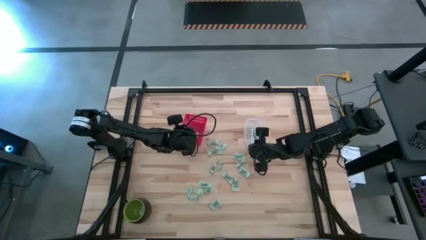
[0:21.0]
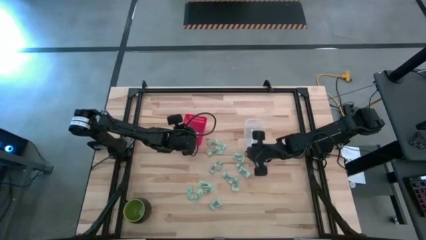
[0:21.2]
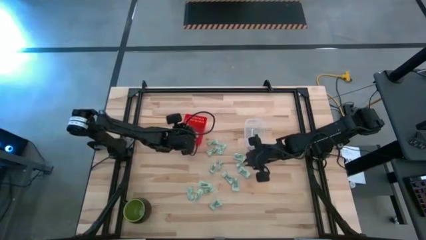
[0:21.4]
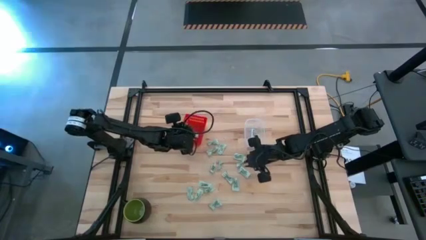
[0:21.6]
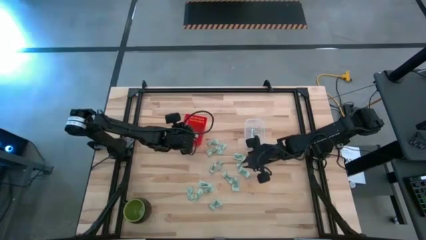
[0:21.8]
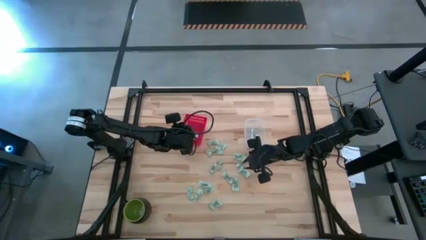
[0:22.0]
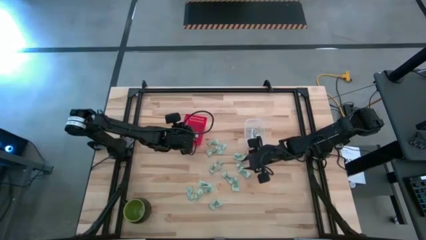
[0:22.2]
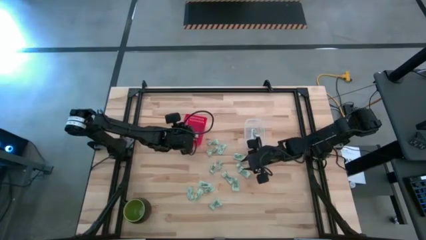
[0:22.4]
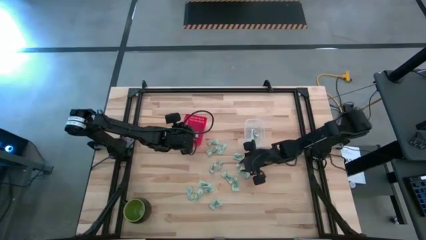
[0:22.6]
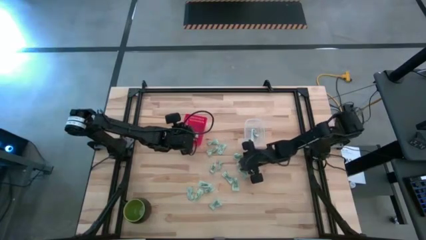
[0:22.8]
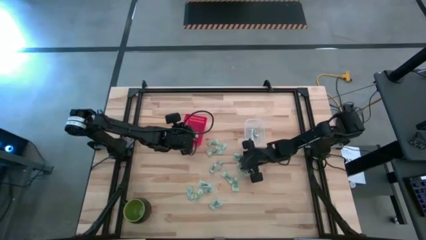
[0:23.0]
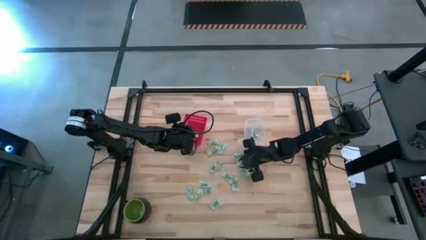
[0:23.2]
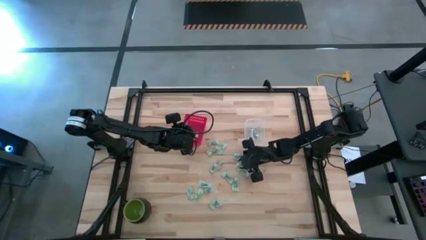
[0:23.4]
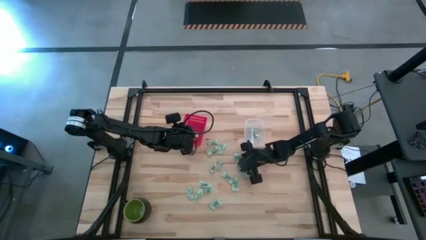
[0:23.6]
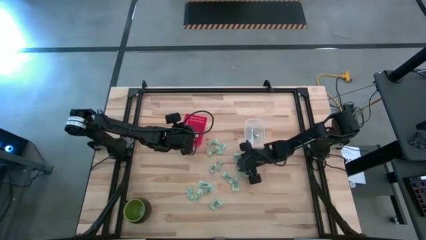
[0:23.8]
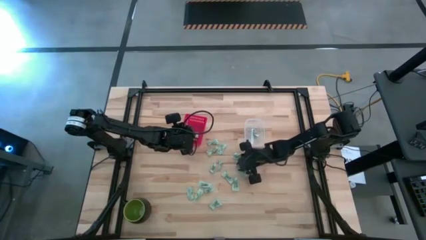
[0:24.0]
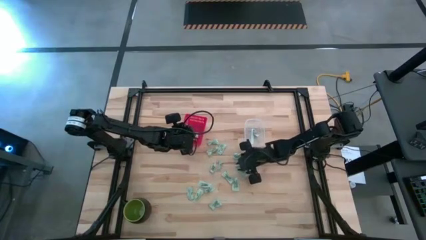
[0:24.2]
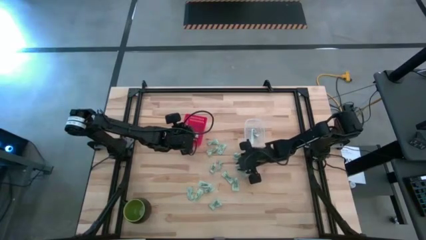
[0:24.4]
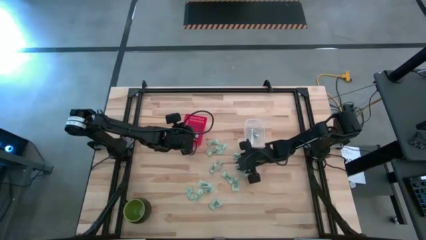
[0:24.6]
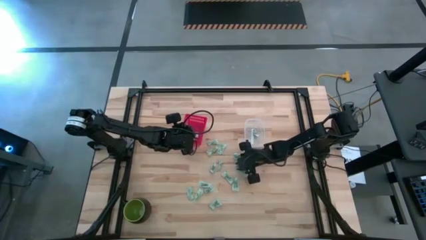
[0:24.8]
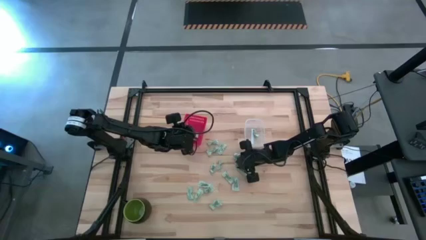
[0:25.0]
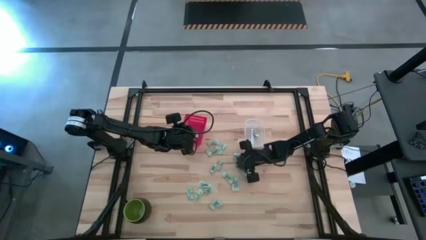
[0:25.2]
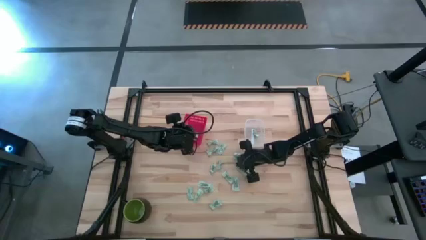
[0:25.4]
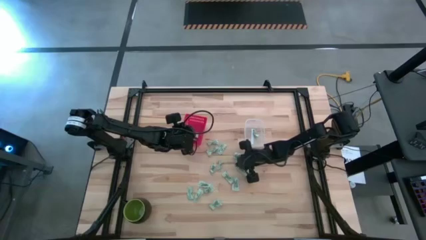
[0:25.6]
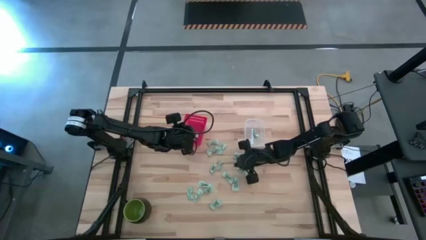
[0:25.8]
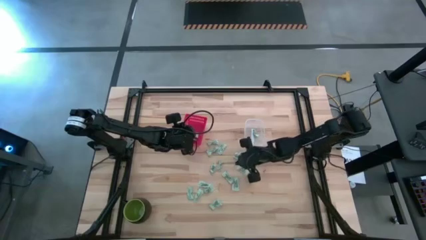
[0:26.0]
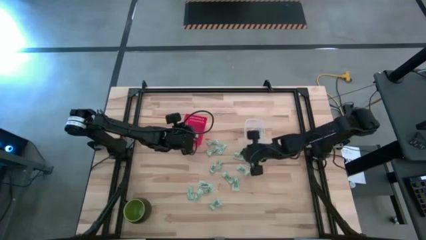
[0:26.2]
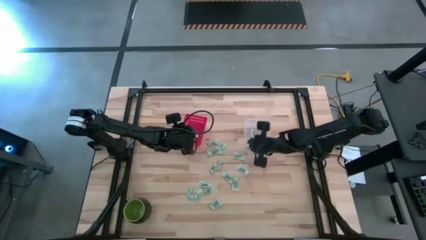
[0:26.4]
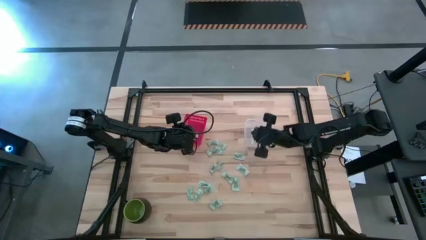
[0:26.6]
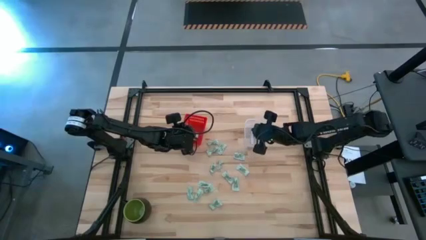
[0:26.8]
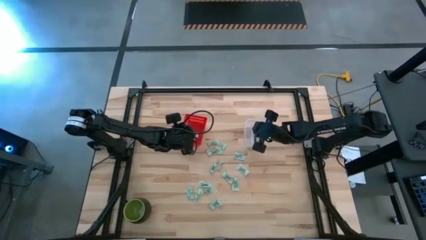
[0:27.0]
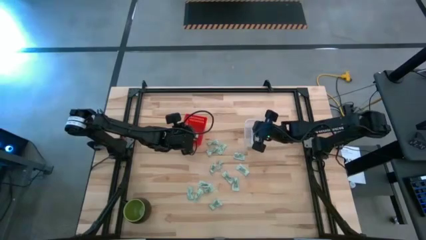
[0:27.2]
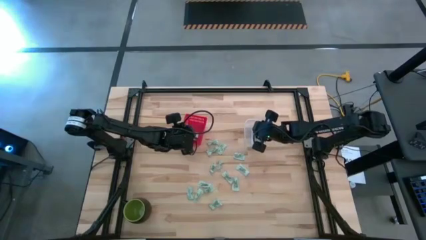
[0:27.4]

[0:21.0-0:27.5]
Task: Pick and place items into bin
Put the stevia packet into the transparent bin

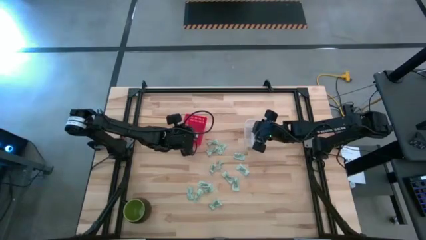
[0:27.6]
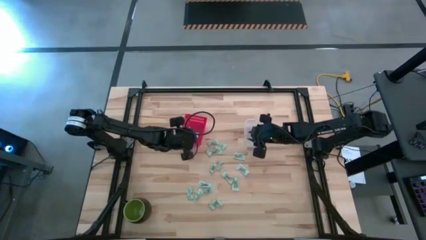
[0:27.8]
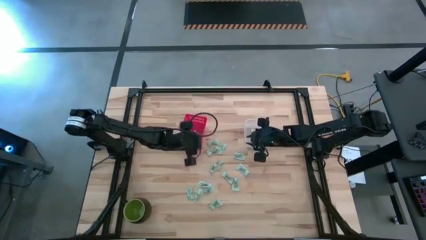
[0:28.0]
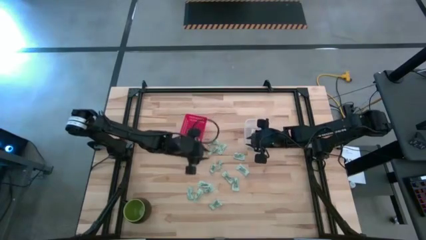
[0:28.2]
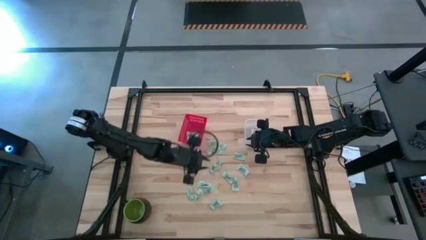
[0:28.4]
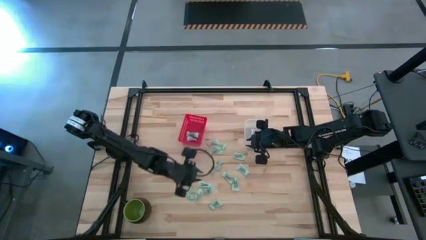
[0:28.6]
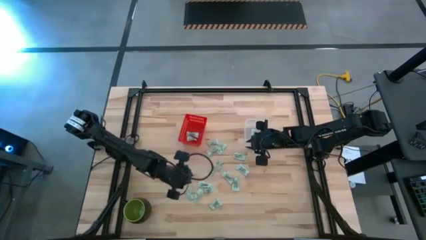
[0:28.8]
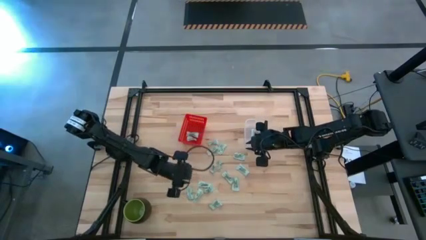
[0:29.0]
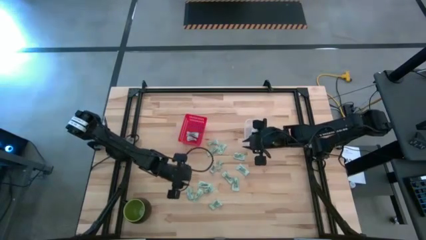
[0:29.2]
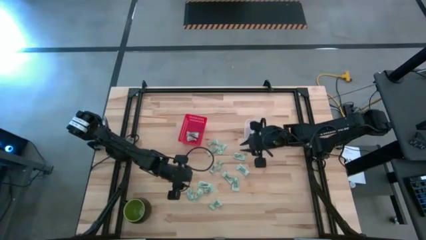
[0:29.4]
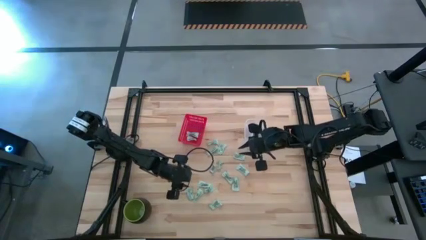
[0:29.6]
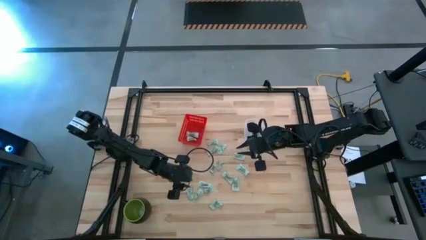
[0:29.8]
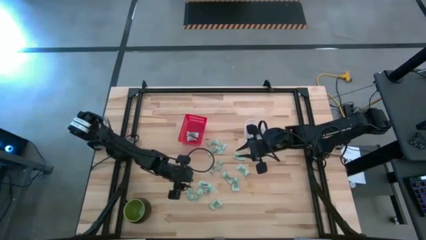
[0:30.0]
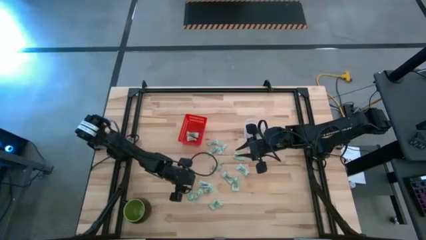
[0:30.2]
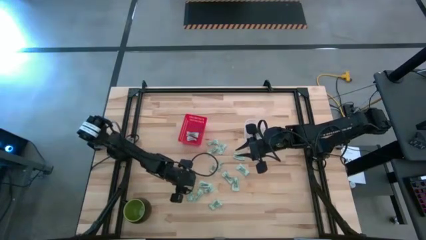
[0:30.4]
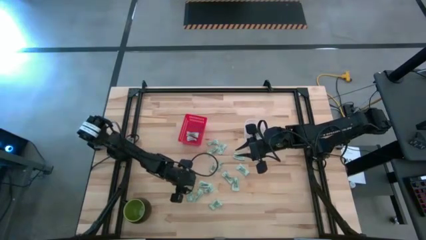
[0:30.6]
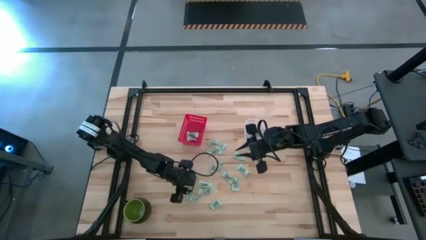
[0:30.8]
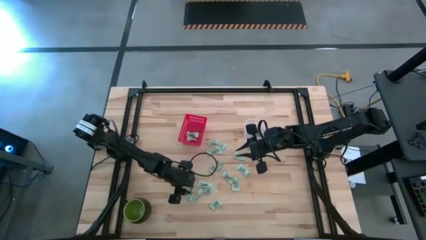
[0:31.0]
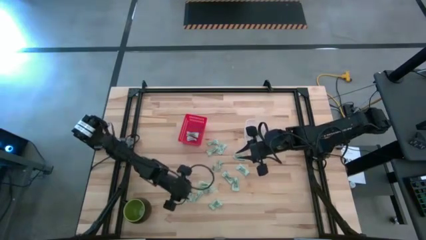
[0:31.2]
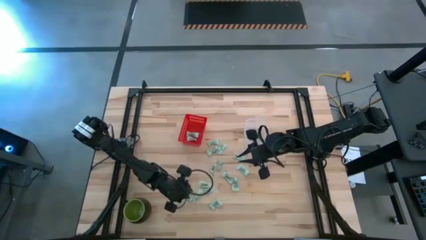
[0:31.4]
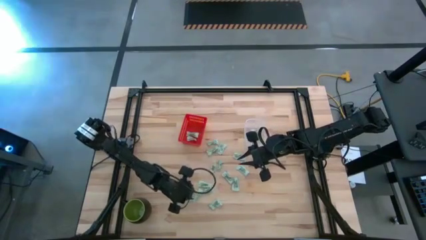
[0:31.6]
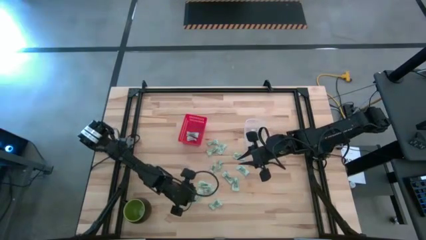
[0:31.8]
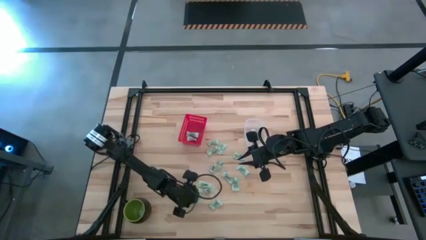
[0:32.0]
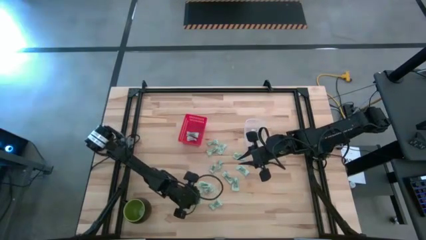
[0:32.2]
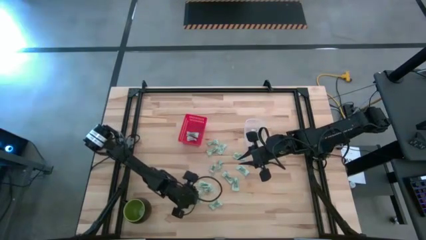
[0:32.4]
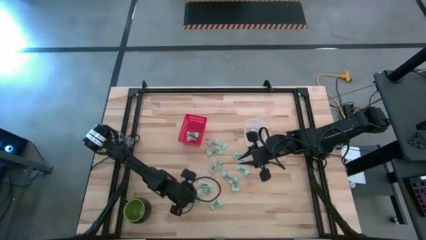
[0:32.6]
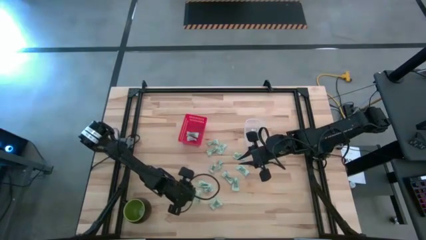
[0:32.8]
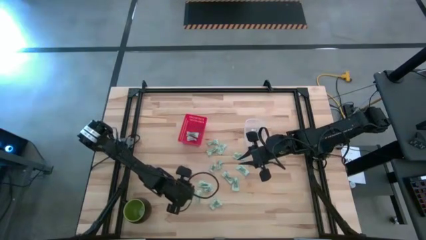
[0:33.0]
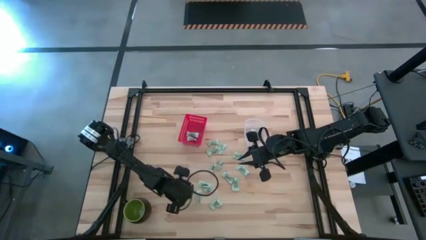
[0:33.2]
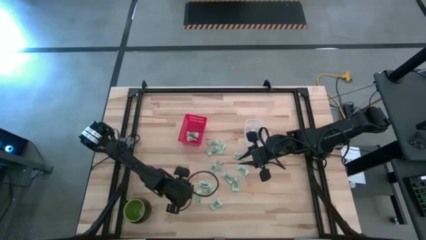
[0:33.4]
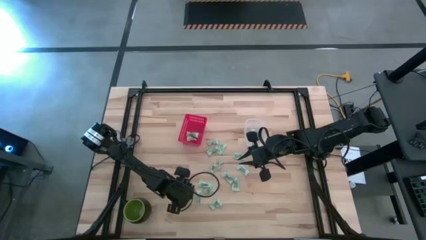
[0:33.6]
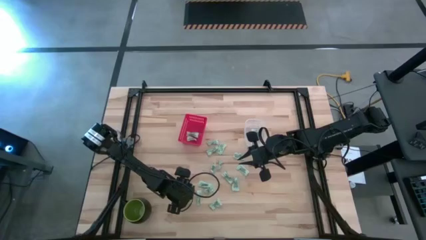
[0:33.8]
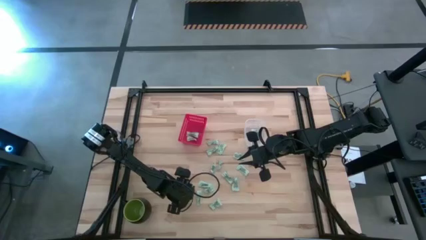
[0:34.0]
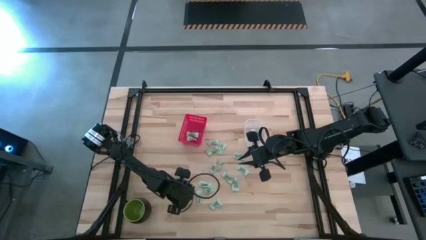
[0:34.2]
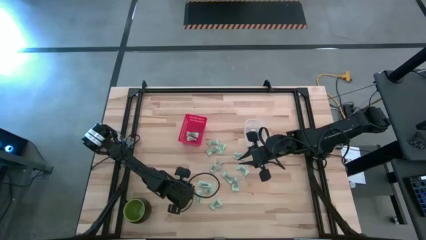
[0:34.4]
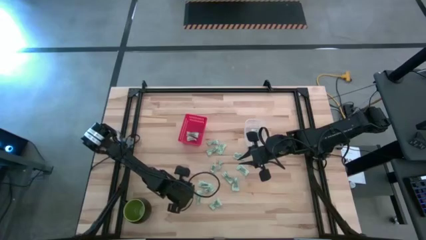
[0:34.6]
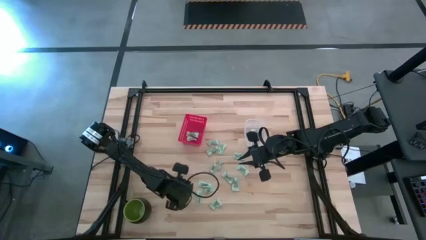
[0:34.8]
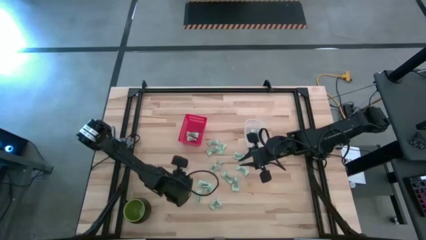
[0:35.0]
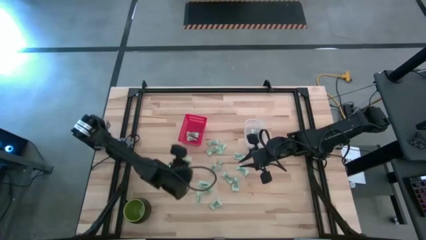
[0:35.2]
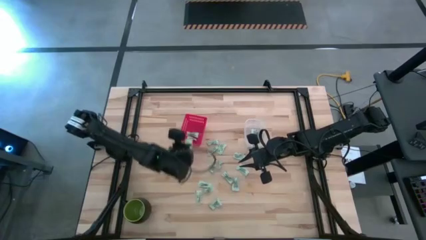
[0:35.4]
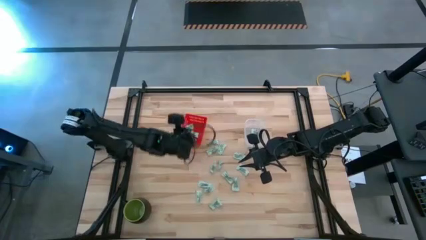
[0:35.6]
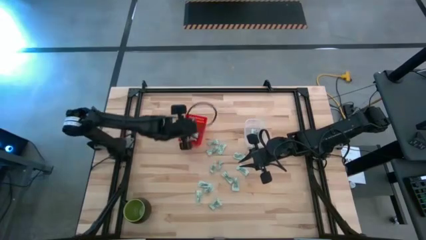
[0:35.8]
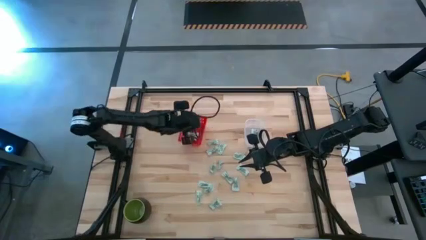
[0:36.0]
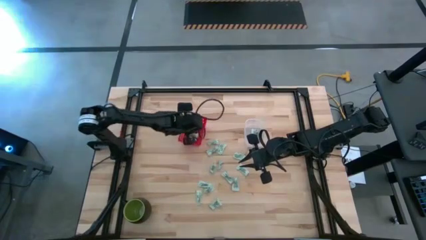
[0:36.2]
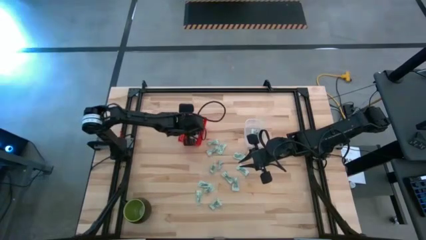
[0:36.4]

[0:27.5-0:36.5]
Put the stevia packet into the red bin

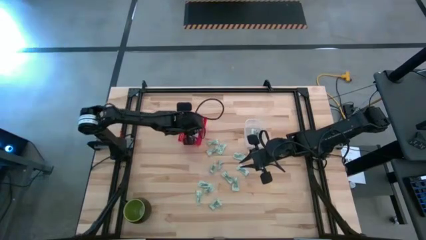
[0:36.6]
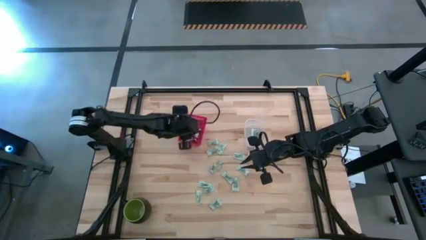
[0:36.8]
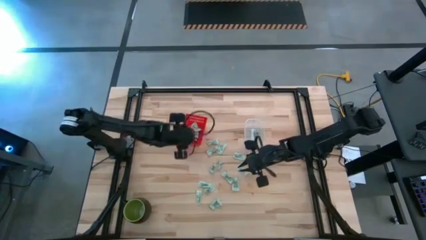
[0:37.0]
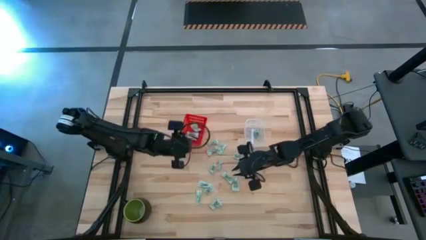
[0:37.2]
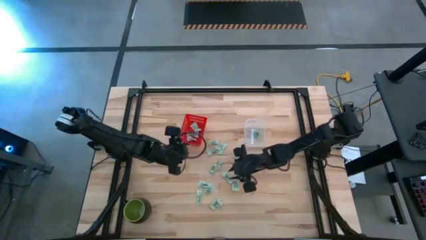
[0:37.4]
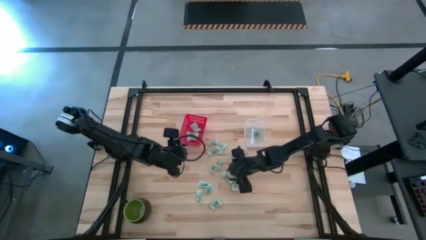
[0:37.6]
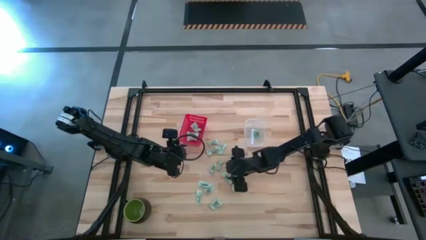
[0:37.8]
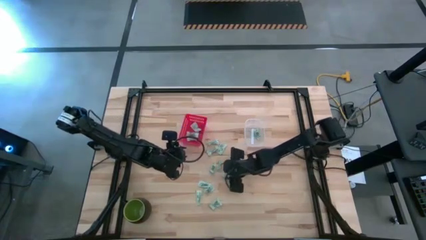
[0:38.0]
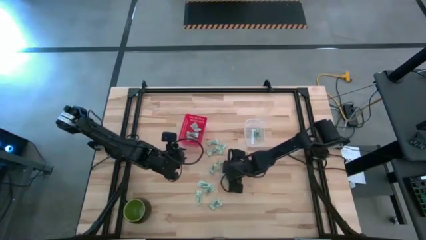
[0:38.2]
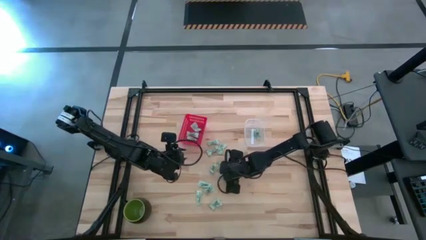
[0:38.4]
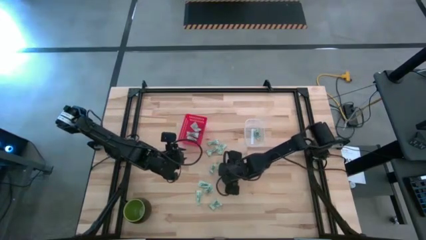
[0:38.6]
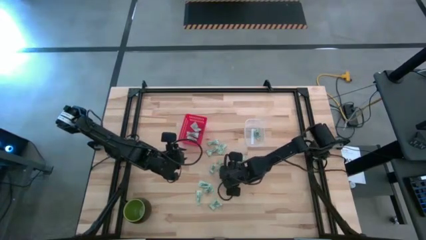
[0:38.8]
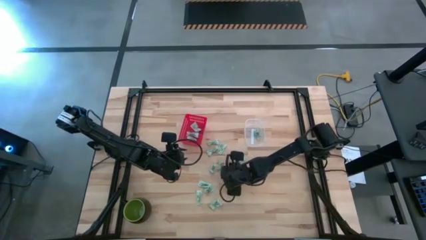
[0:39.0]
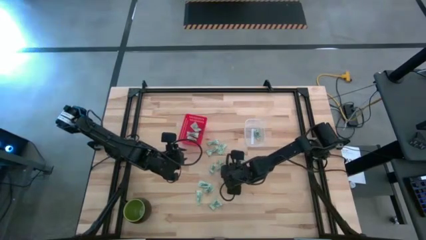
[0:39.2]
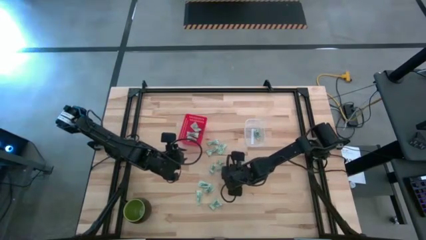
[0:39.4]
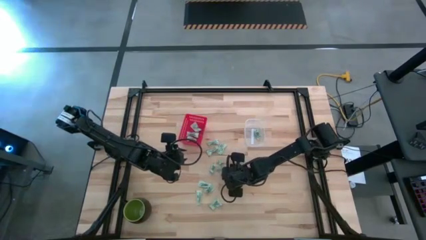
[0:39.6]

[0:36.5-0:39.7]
Put the stevia packet into the transparent bin
